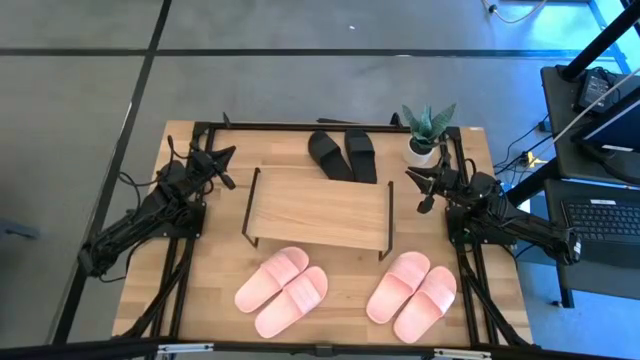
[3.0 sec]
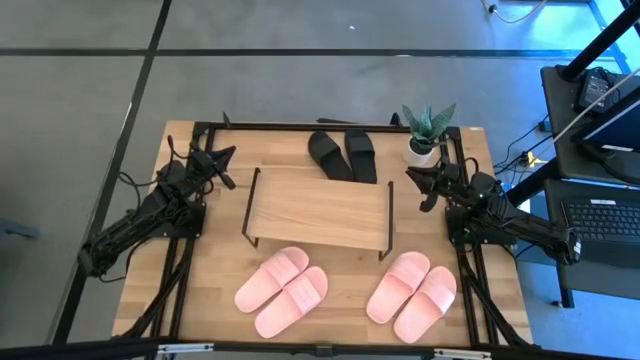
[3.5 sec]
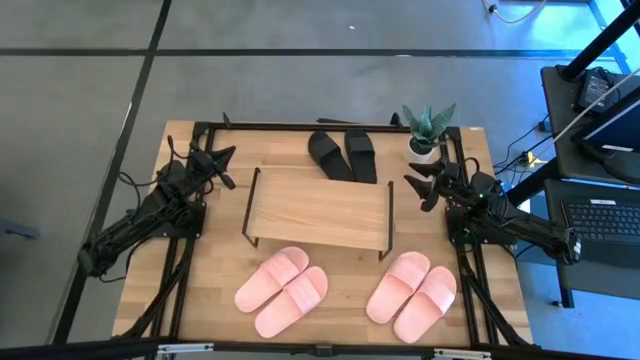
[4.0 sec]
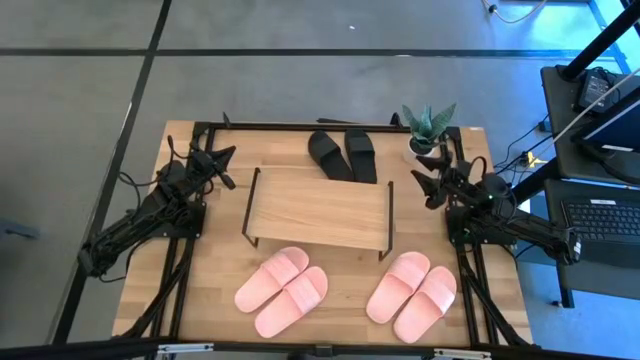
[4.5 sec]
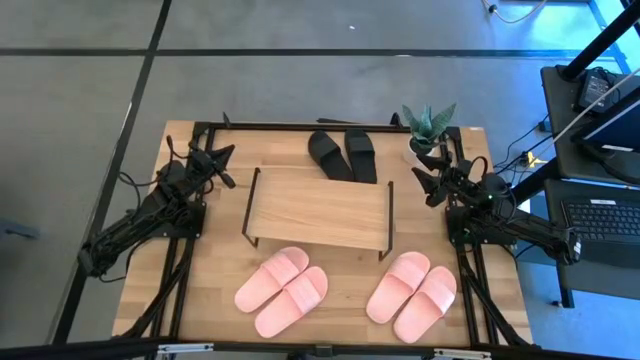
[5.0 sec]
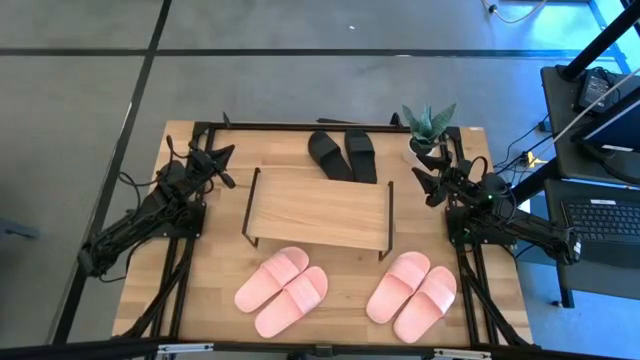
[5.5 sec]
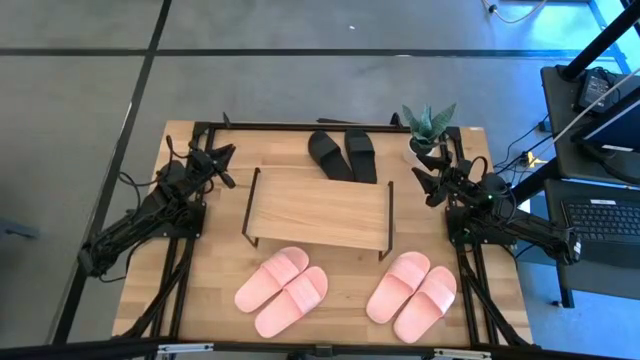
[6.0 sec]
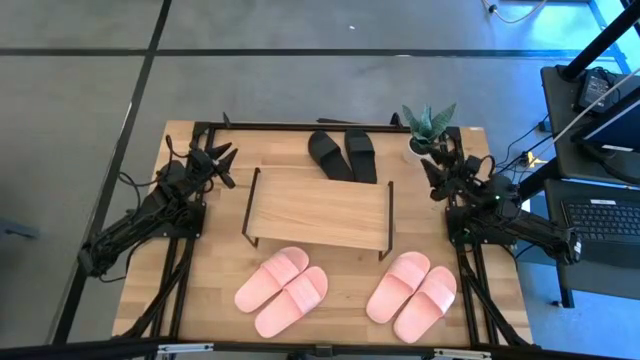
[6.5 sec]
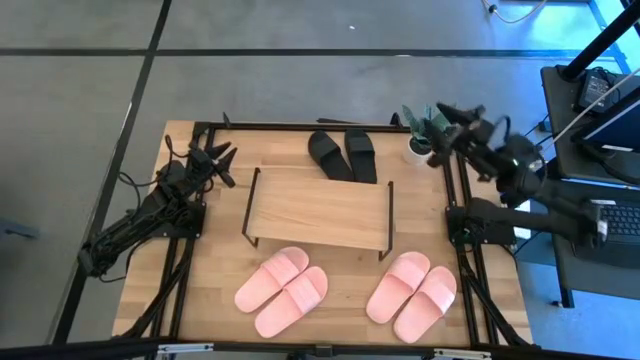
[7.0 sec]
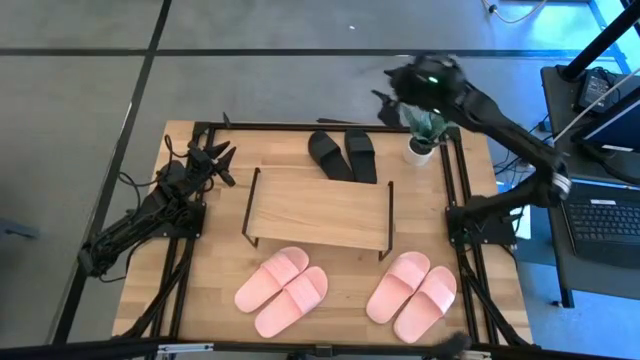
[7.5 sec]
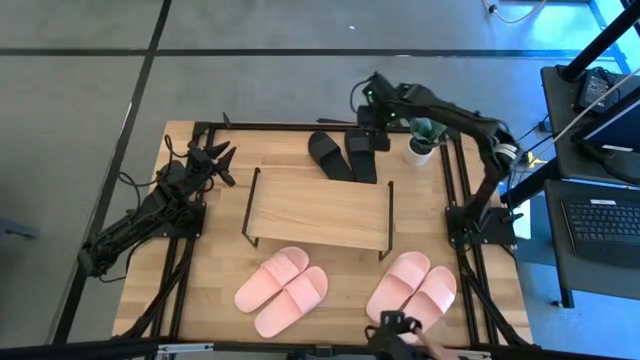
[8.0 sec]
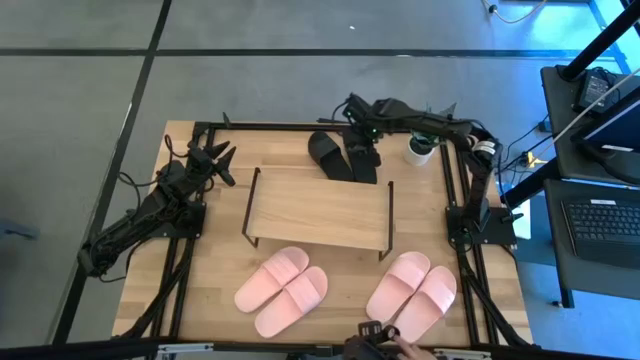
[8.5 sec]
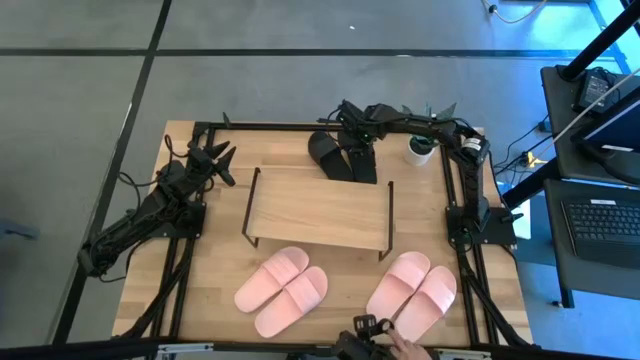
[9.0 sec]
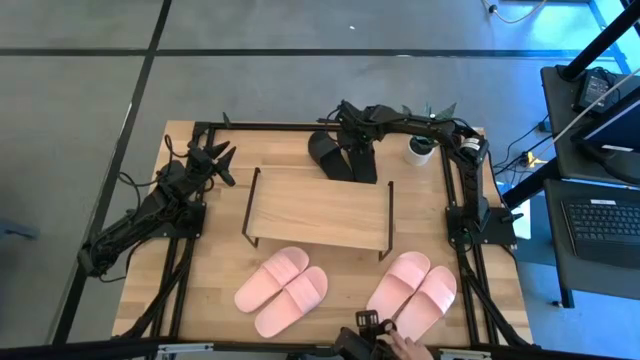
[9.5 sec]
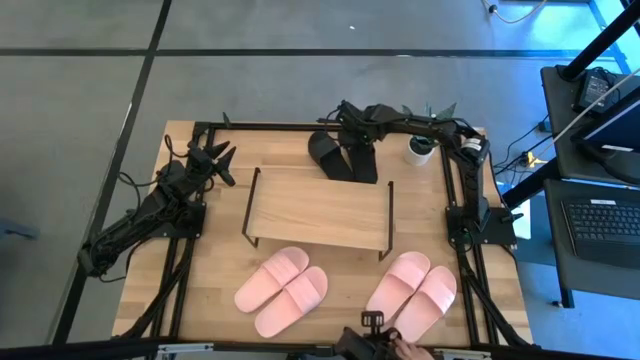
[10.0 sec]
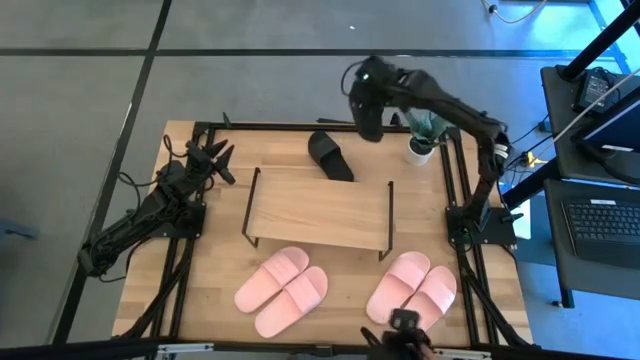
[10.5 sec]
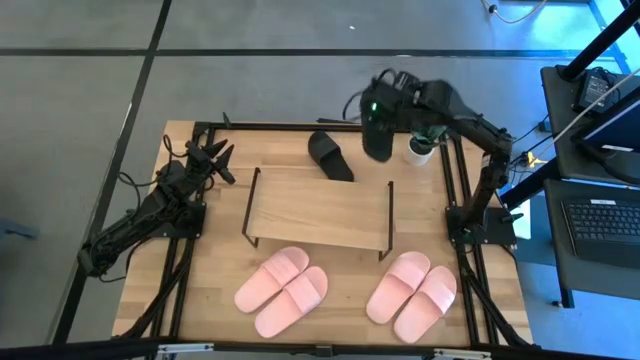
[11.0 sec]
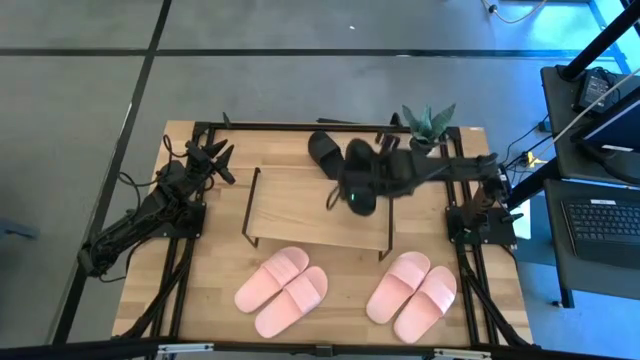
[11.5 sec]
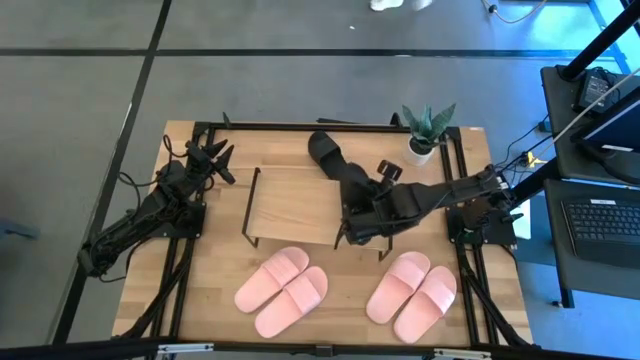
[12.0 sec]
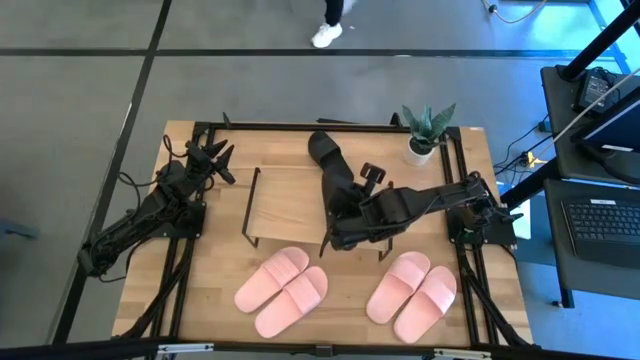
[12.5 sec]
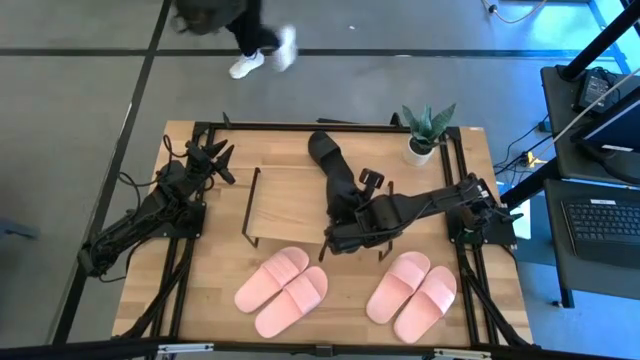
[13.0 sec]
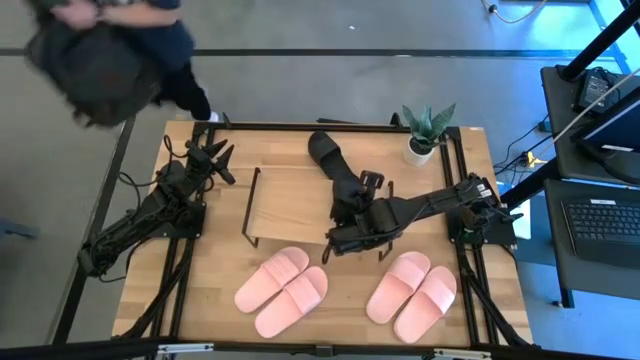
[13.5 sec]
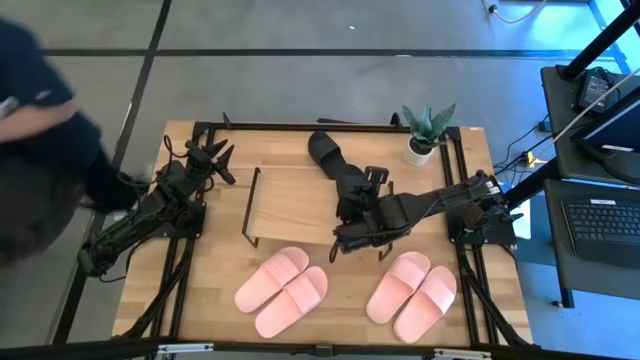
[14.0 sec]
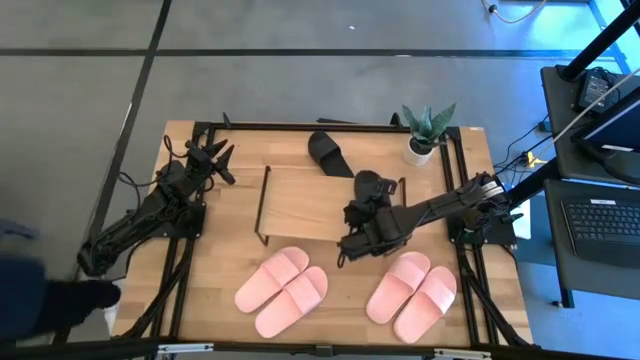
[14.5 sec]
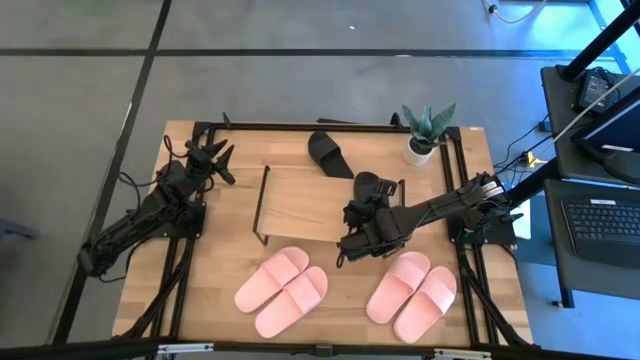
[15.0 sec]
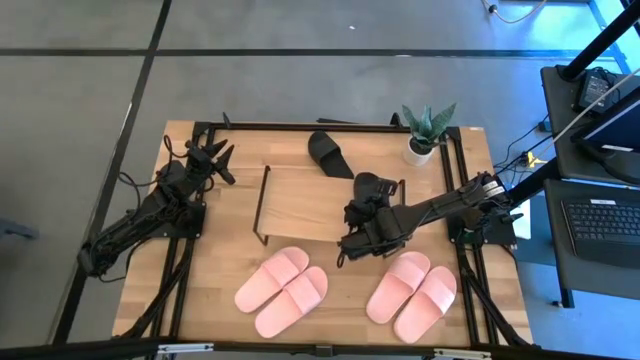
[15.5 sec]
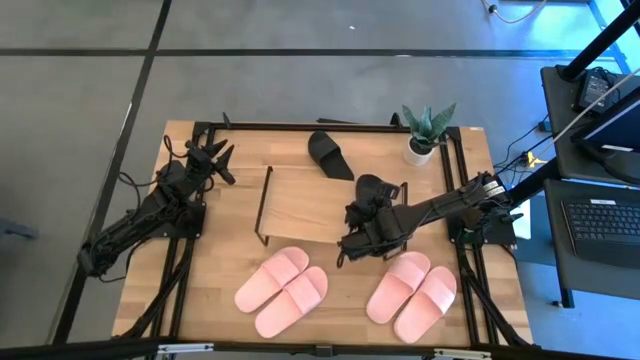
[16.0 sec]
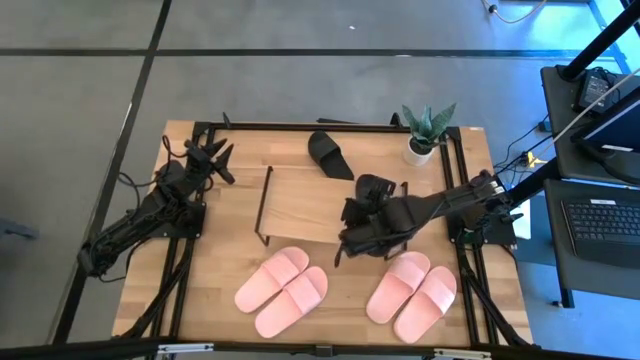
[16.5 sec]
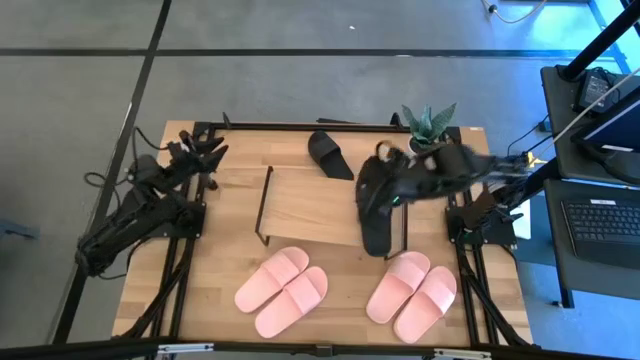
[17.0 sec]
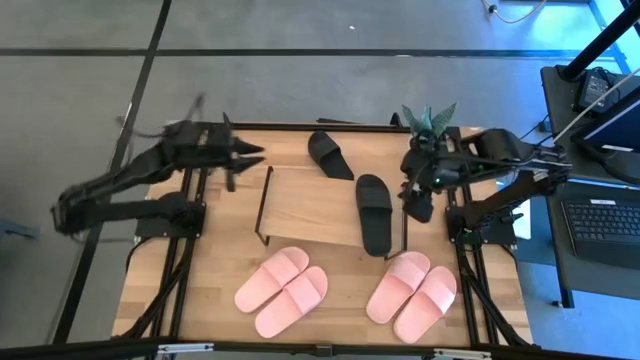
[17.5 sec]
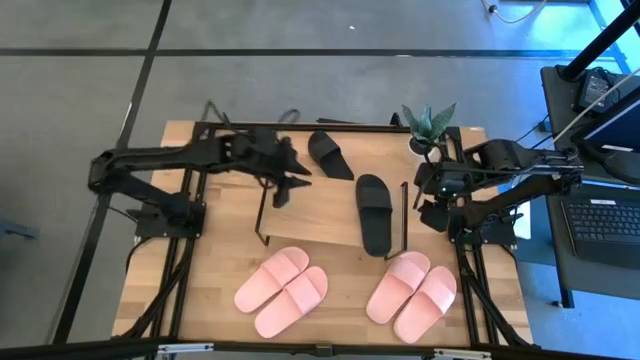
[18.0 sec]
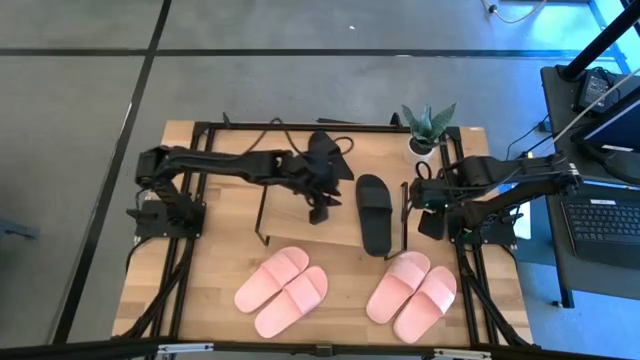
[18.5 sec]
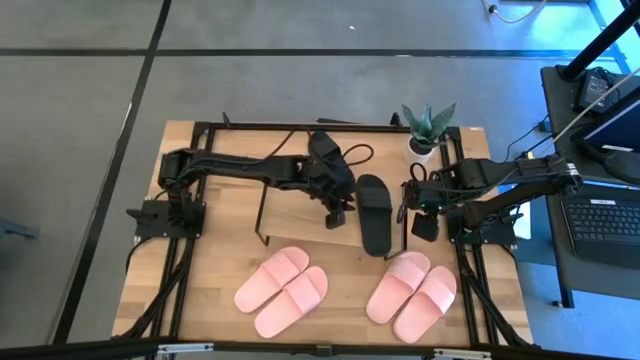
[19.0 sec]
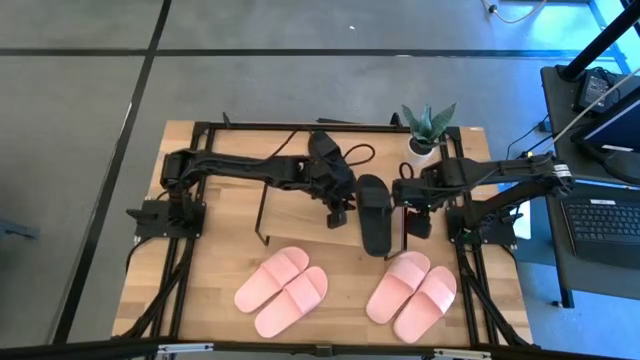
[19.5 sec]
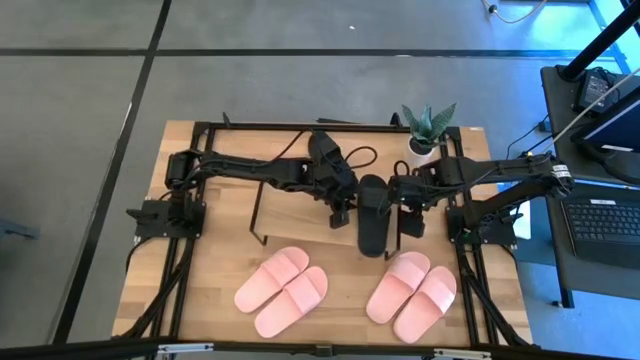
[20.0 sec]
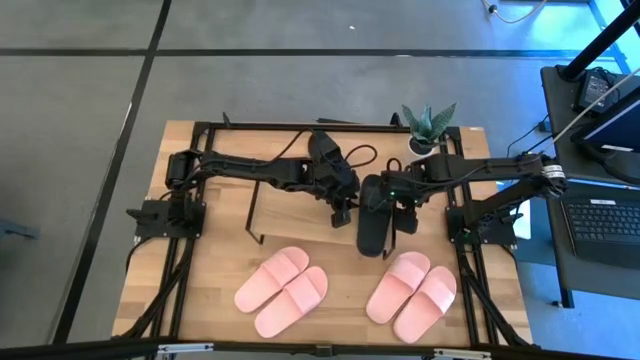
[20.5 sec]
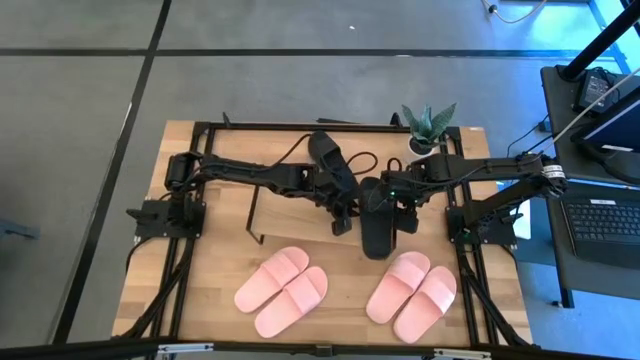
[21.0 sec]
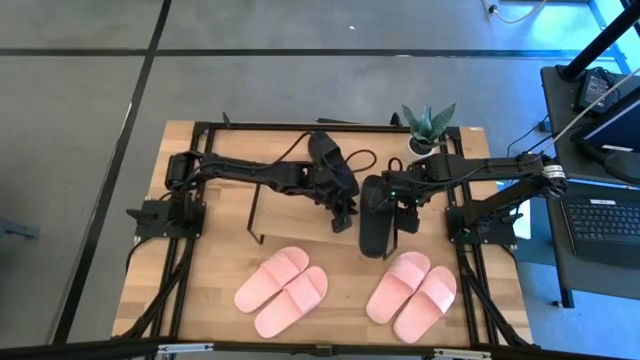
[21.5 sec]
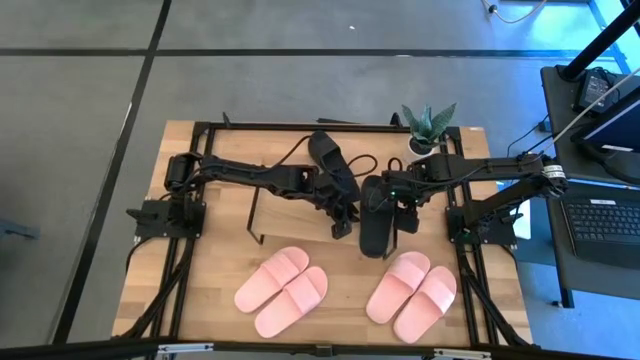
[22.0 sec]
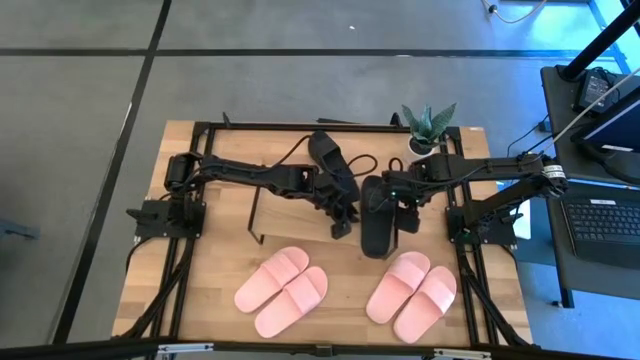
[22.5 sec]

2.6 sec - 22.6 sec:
Task: Pick and place slides into the shelf
Put the right black slides on the shelf
